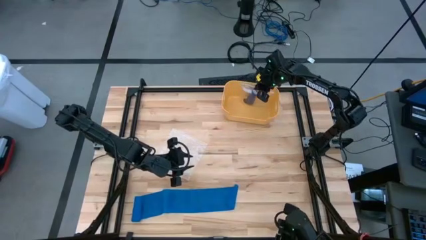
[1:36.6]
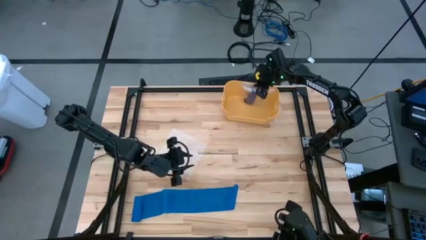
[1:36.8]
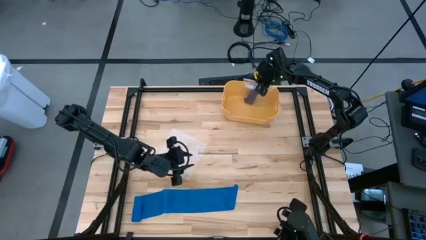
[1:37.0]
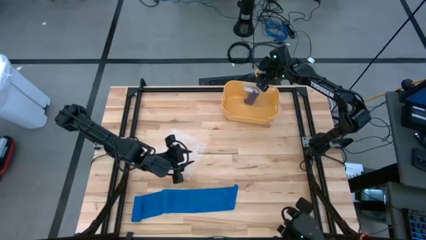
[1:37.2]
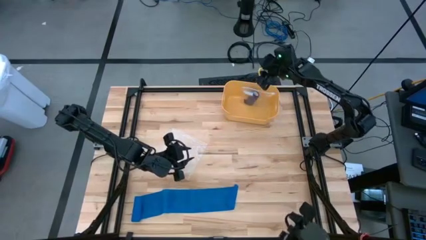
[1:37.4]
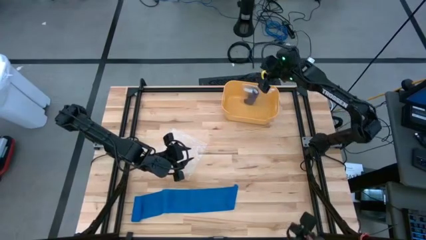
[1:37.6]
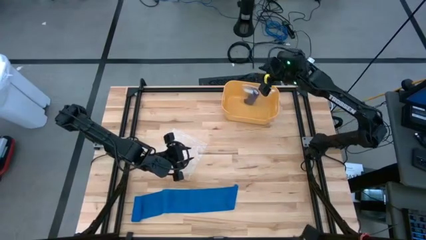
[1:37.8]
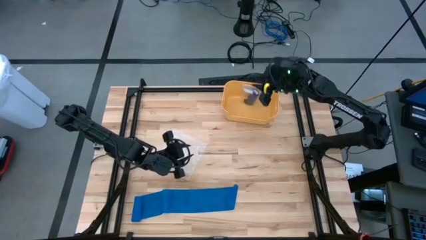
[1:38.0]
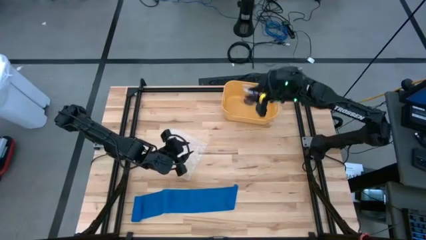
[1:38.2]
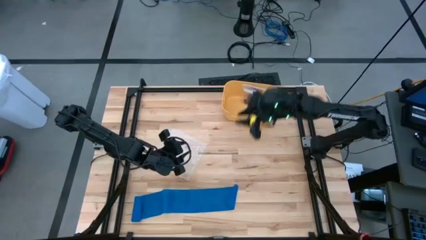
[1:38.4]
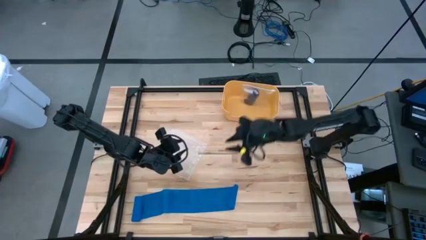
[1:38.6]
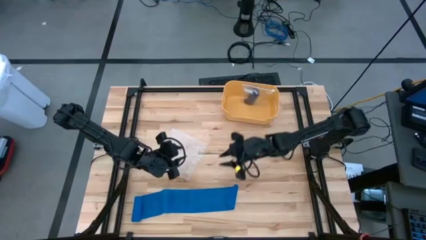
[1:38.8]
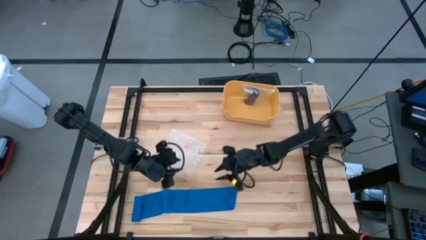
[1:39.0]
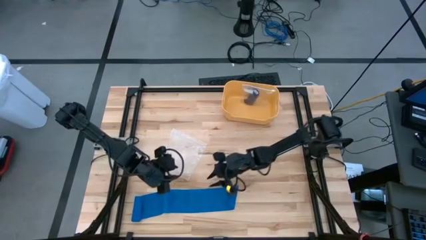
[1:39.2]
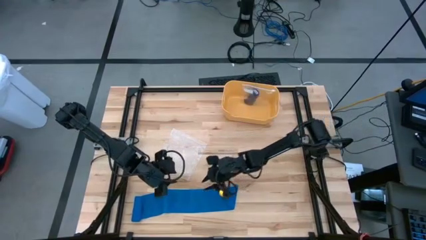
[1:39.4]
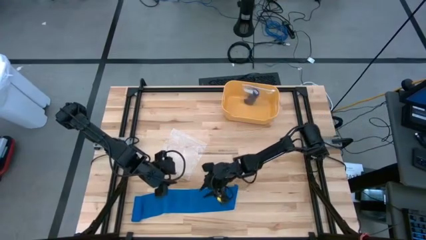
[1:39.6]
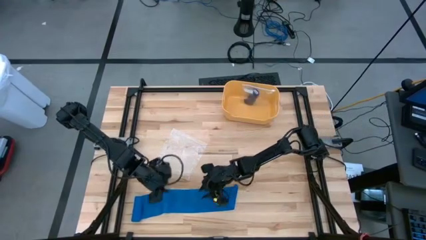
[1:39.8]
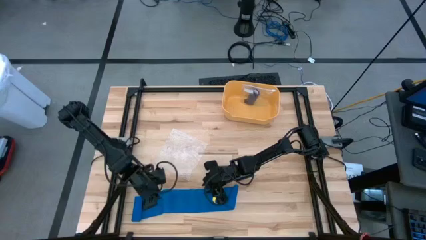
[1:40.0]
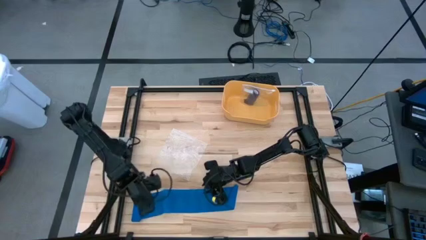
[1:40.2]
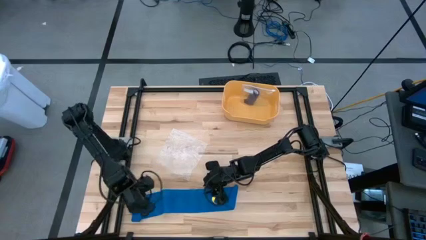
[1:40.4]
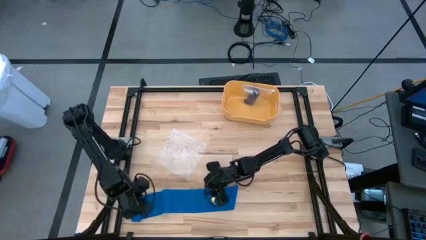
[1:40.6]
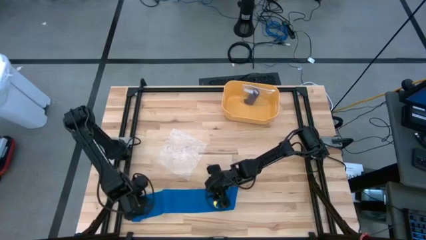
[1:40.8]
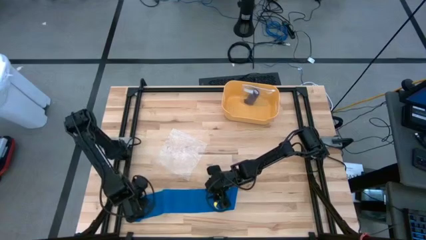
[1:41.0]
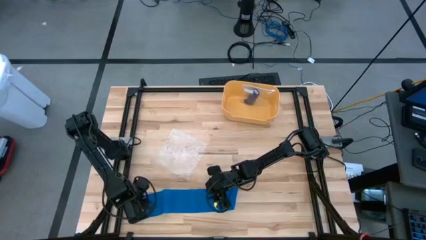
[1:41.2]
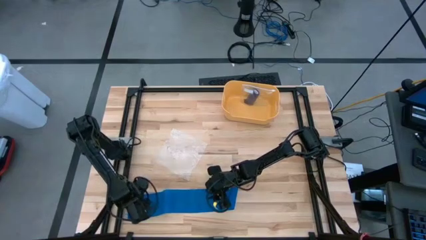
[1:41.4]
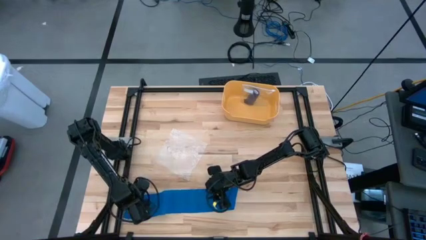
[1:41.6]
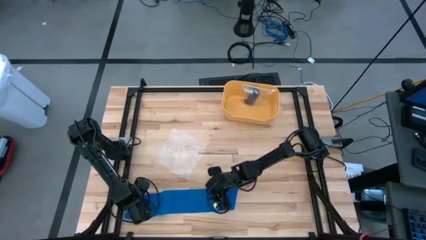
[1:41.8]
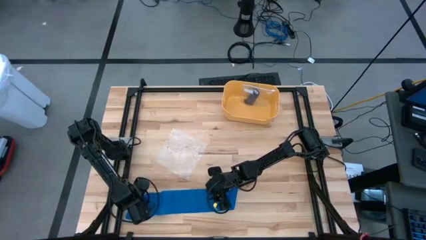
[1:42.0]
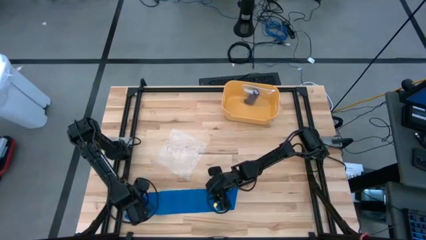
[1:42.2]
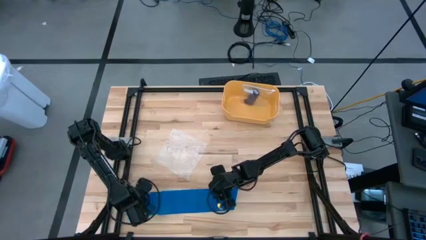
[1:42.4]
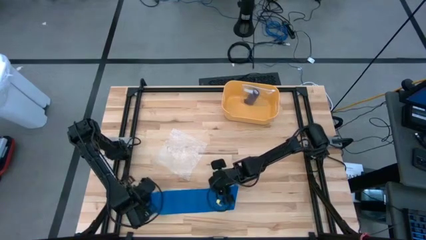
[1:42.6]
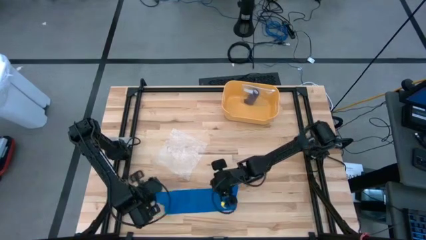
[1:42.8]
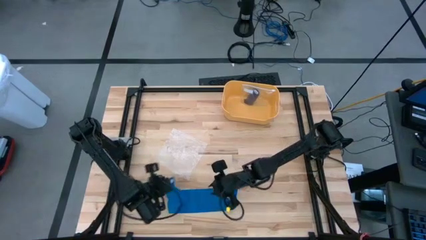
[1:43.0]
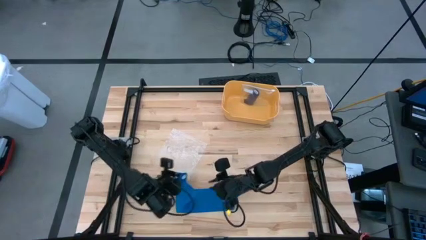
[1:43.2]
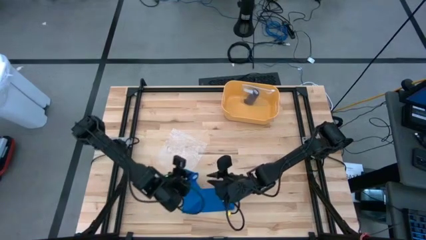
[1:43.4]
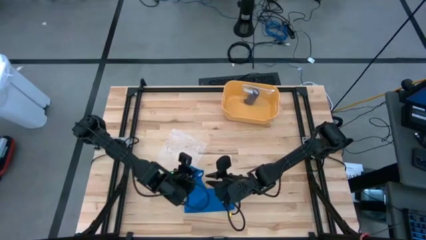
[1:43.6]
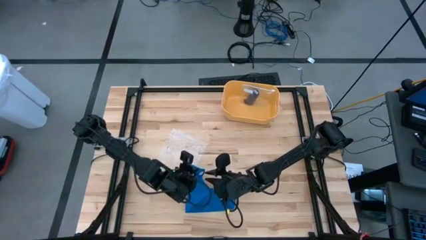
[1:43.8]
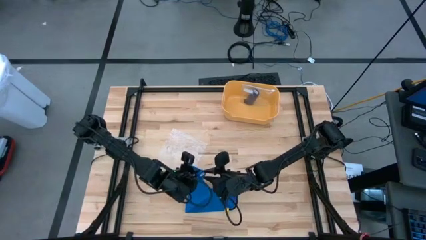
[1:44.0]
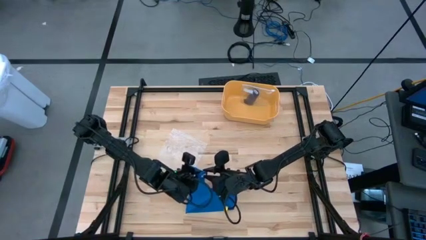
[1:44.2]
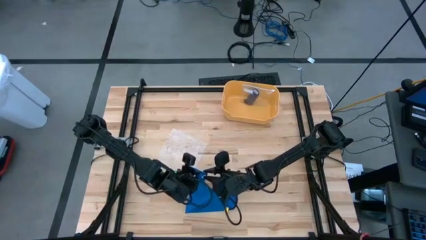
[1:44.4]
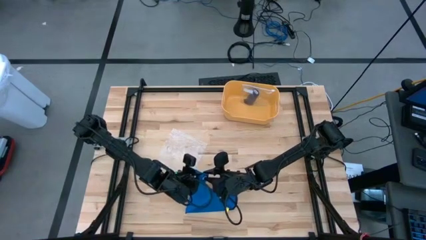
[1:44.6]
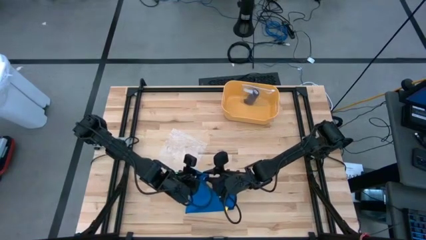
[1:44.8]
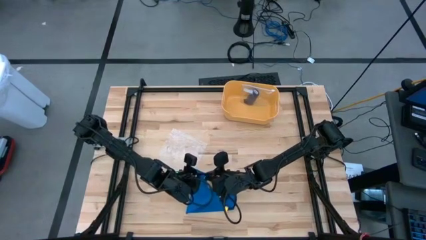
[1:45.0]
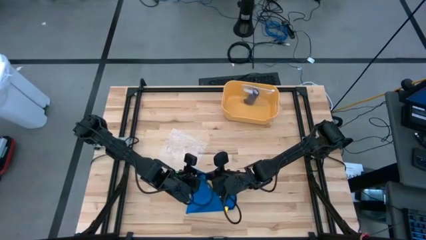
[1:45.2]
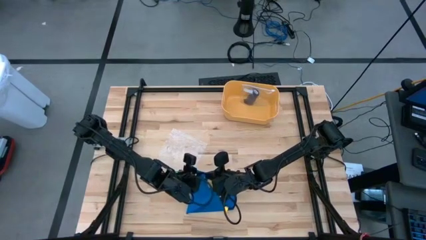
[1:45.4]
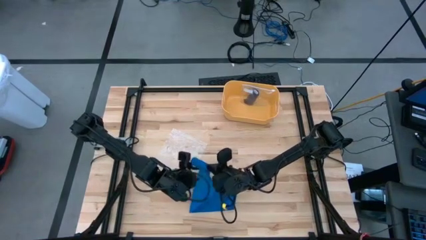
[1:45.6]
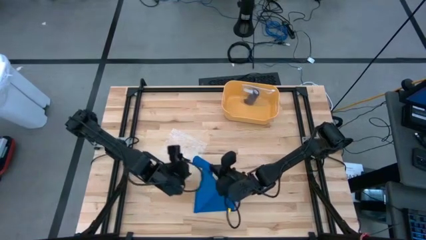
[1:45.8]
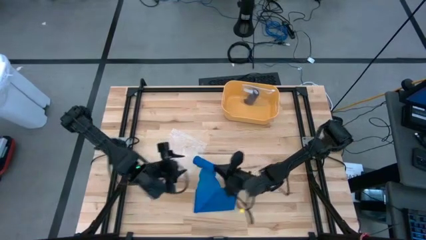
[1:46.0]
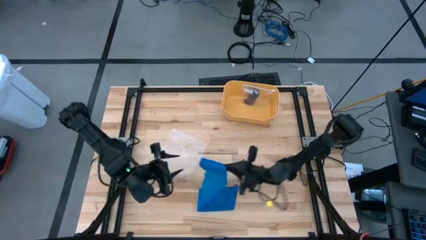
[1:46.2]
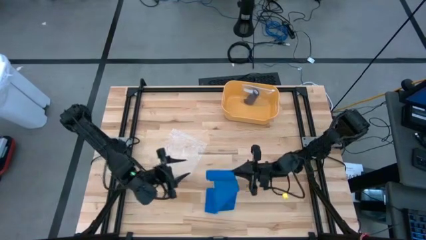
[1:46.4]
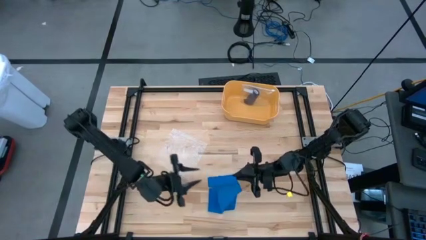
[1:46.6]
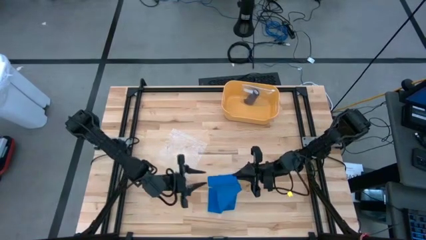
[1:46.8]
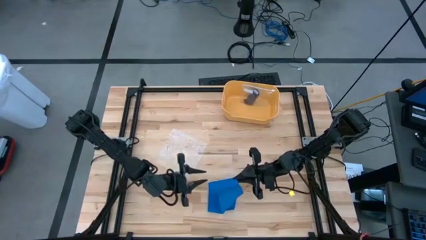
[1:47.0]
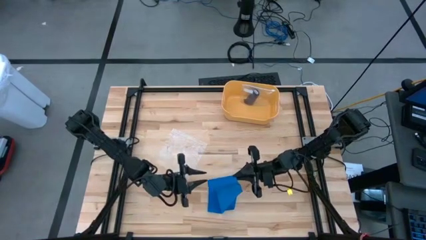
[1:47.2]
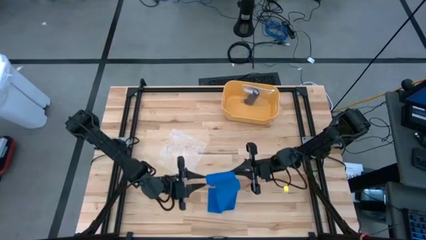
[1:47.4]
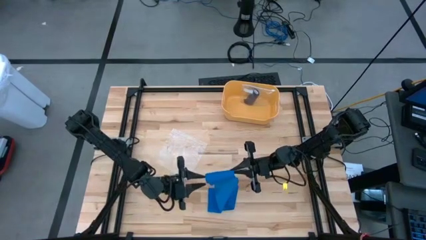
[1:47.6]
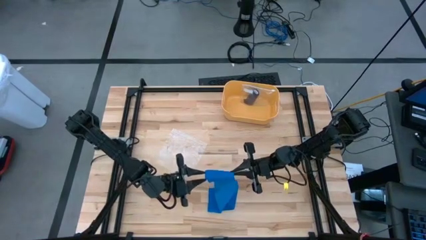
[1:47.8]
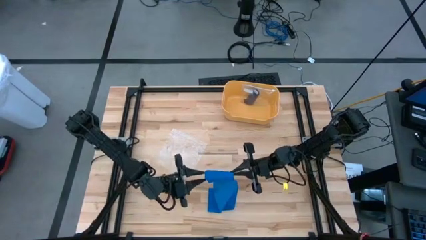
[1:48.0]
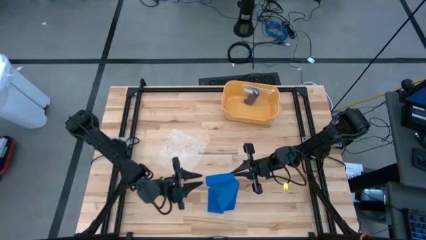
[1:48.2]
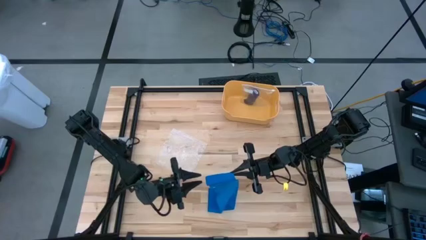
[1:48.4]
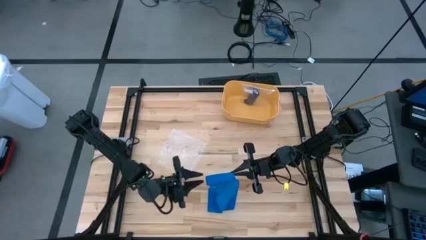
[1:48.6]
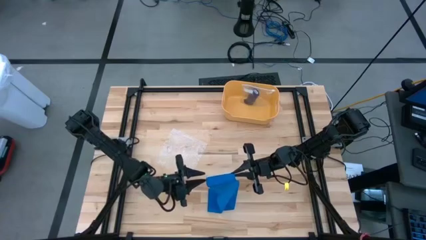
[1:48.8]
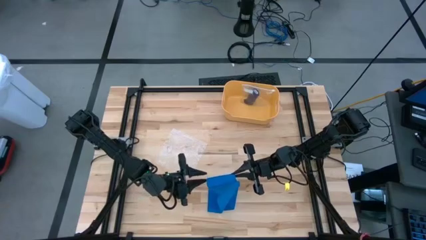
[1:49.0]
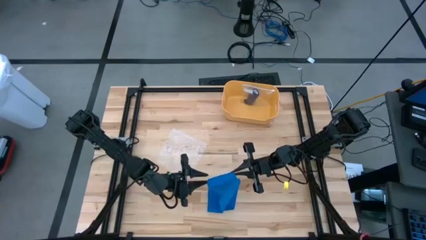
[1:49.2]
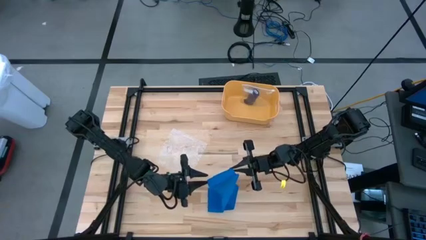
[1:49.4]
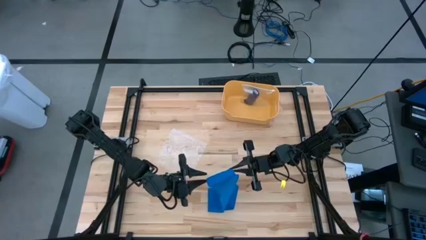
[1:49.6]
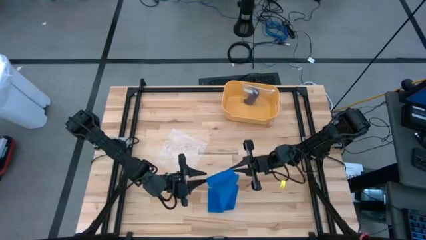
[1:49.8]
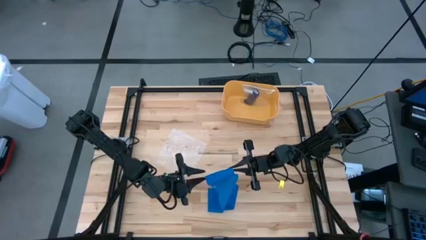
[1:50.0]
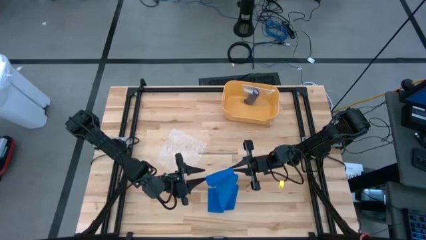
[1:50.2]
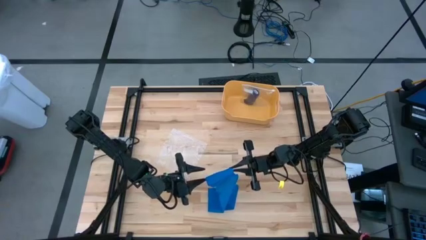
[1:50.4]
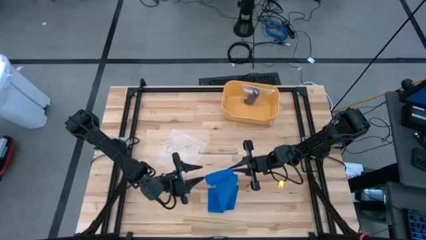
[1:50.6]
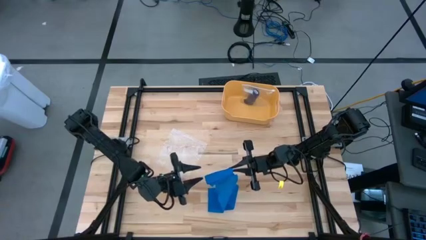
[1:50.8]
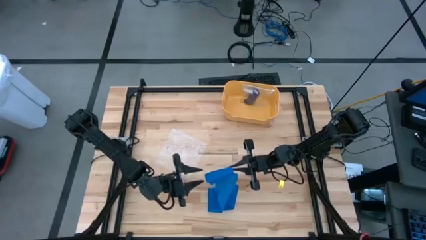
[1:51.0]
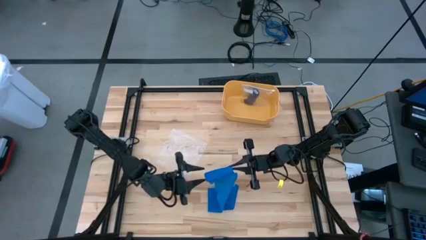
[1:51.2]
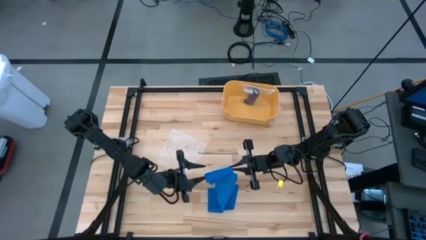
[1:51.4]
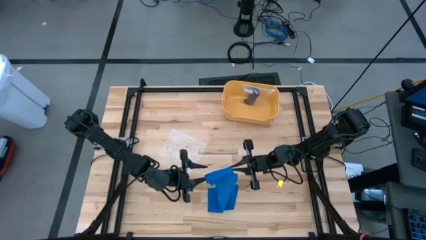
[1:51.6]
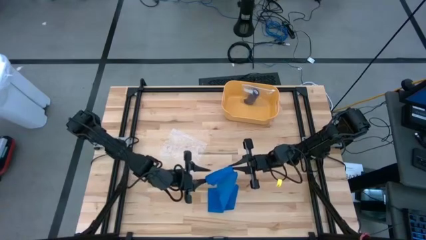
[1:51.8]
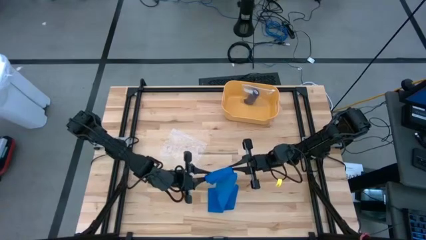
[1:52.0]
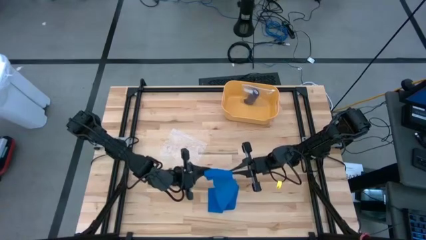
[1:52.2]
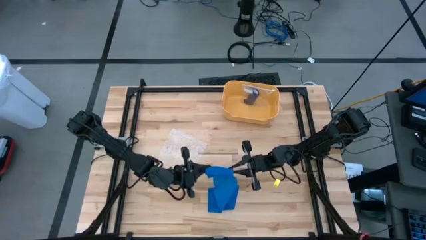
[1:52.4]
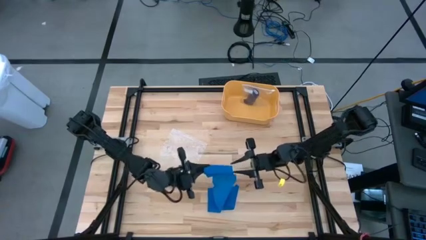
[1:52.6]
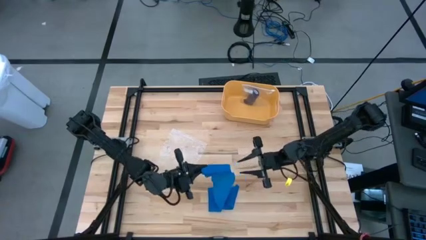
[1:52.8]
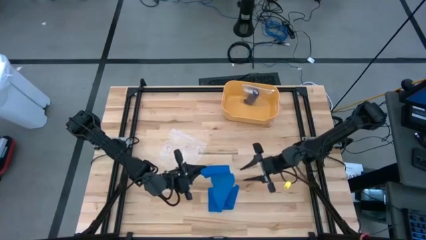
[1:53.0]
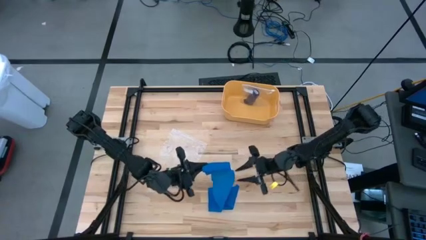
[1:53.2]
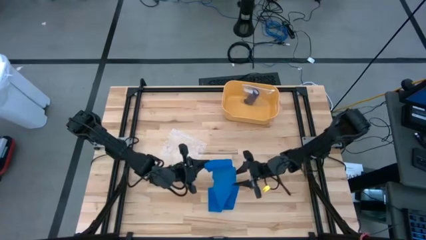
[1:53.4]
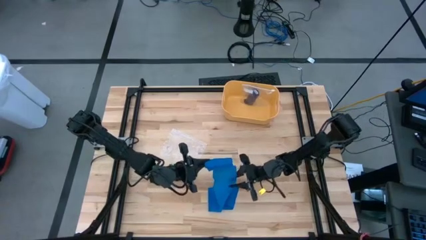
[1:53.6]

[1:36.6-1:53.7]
Task: Roll bandage
Roll the blue bandage
